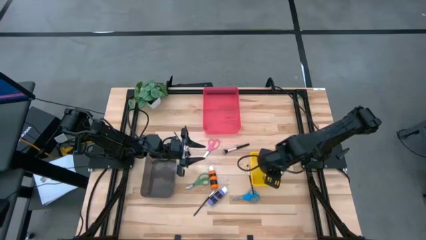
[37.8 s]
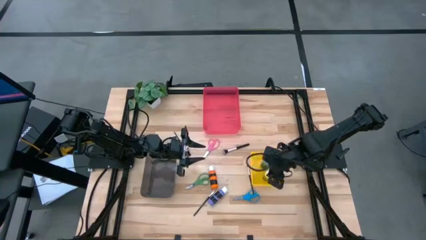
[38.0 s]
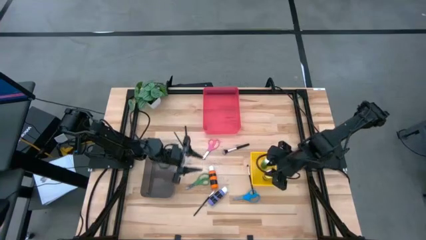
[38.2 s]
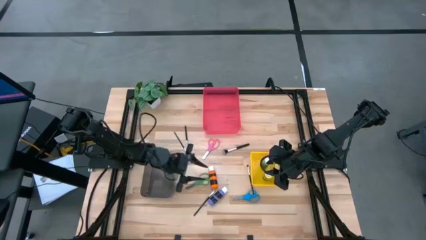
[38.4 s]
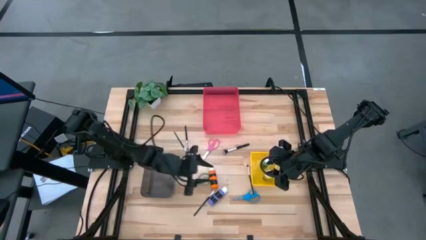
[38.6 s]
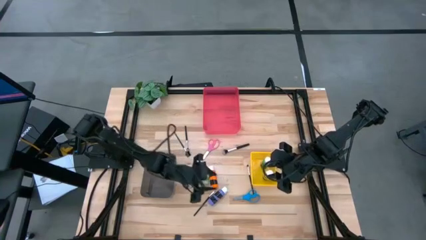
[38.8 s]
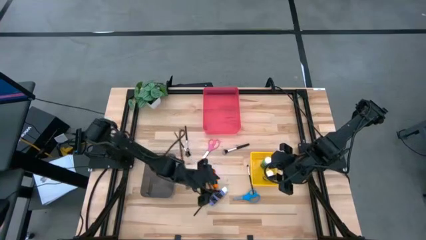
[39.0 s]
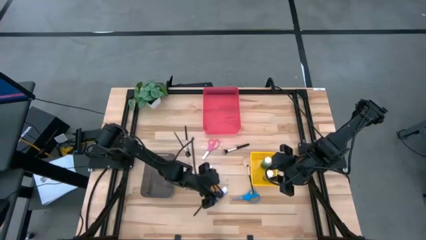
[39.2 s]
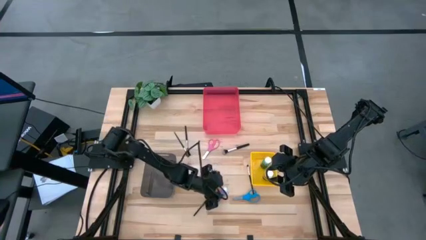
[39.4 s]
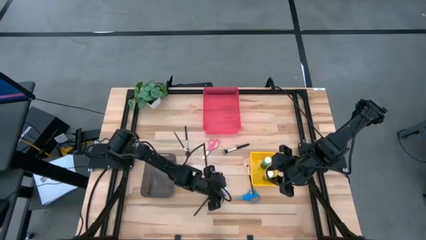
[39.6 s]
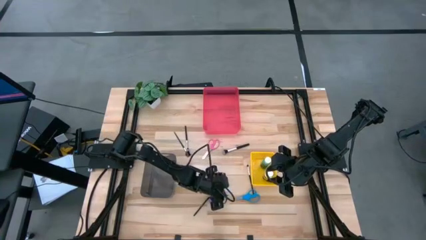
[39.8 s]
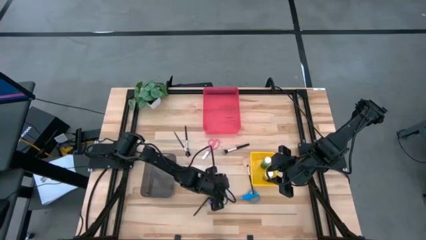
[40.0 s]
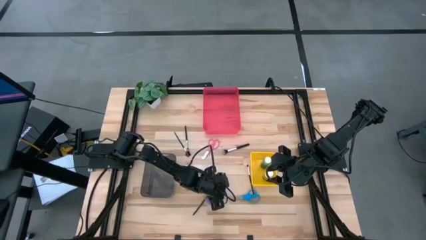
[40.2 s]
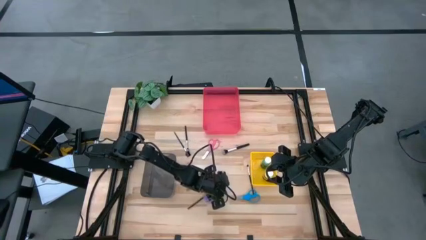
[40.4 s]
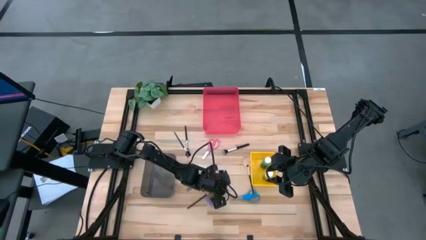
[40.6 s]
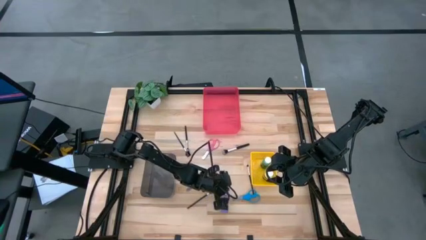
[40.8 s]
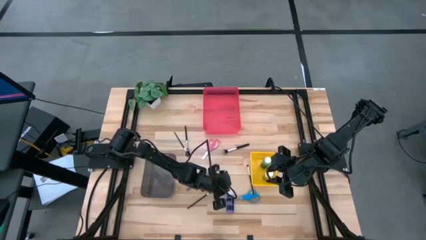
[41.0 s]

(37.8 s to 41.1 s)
Task: Pick & Place Paint Supplies
Put the violet paint bottle into the yellow bin

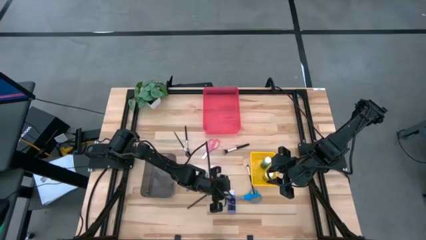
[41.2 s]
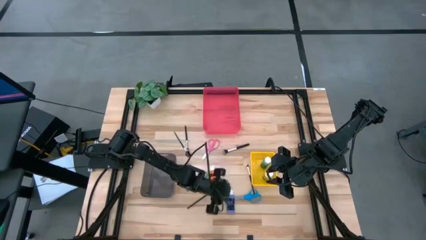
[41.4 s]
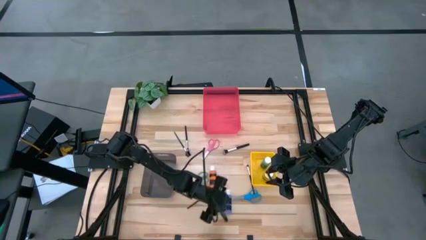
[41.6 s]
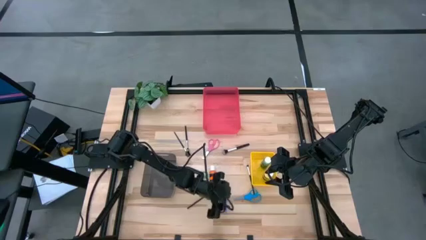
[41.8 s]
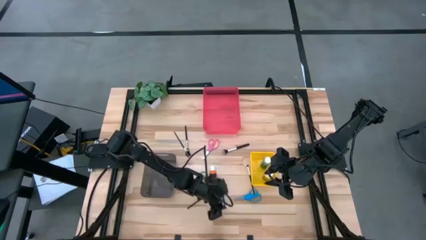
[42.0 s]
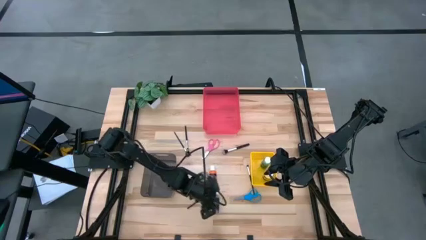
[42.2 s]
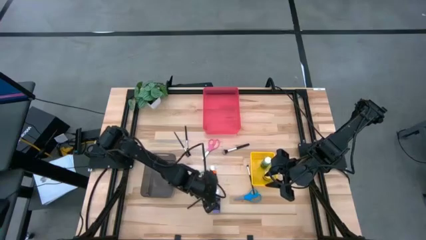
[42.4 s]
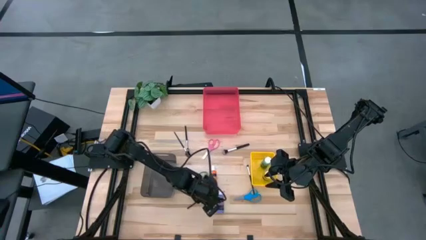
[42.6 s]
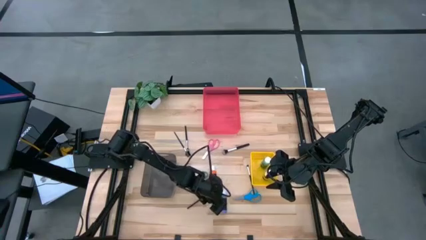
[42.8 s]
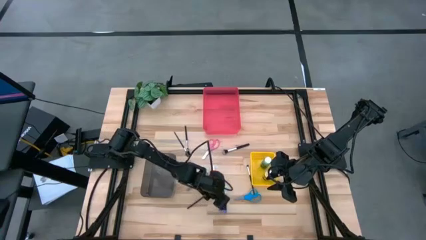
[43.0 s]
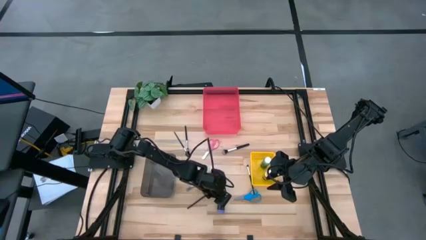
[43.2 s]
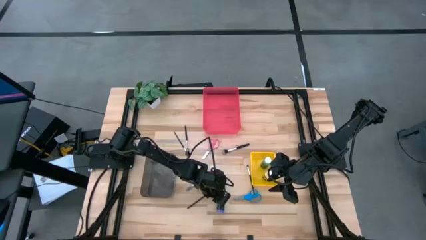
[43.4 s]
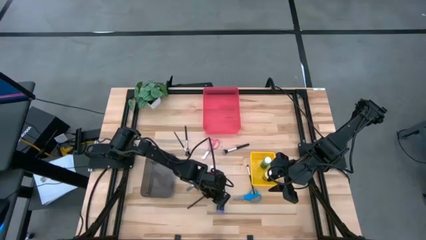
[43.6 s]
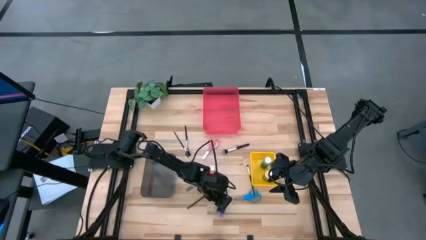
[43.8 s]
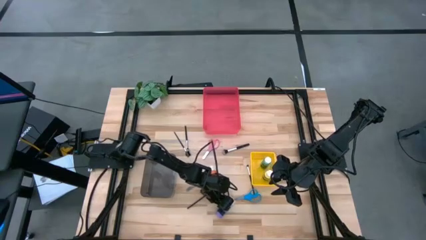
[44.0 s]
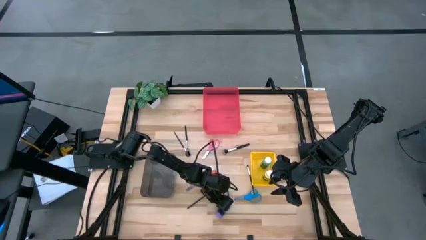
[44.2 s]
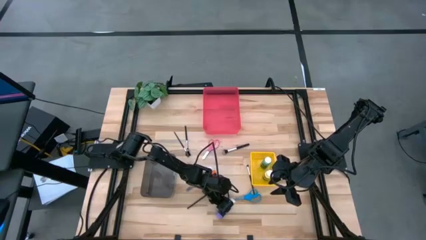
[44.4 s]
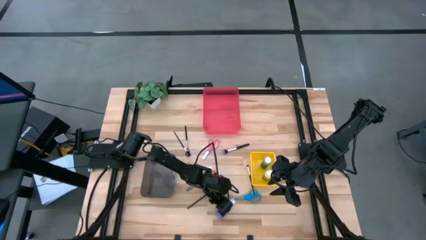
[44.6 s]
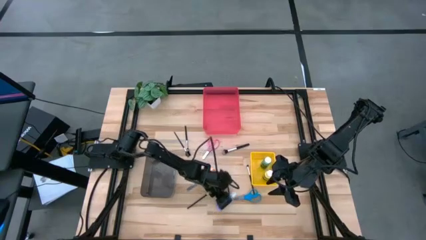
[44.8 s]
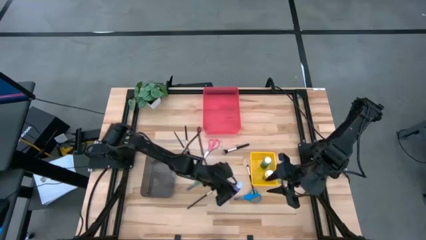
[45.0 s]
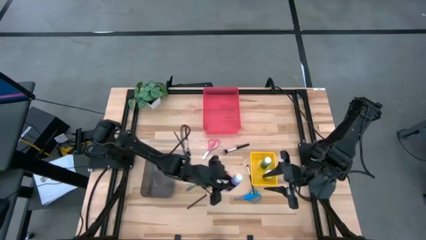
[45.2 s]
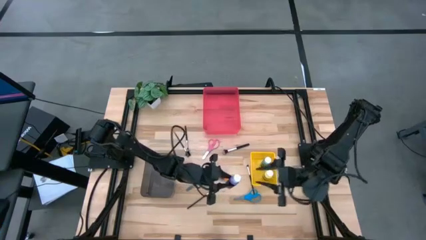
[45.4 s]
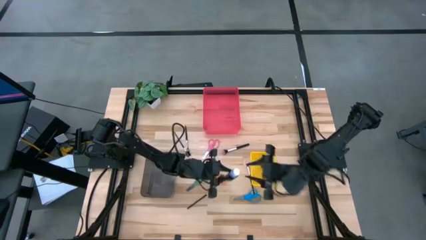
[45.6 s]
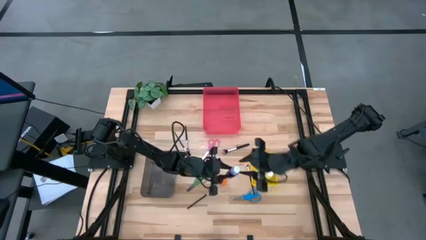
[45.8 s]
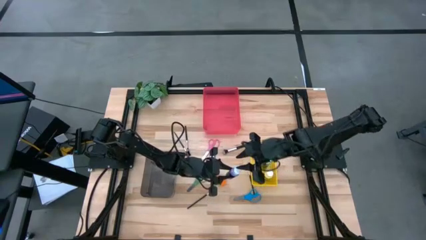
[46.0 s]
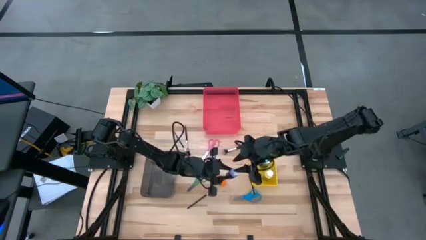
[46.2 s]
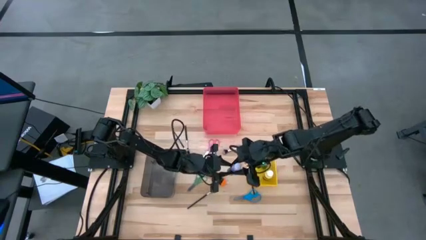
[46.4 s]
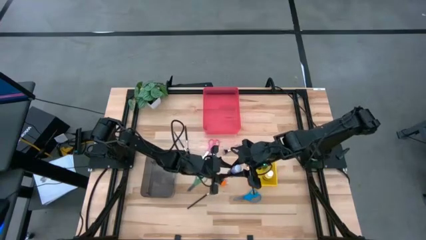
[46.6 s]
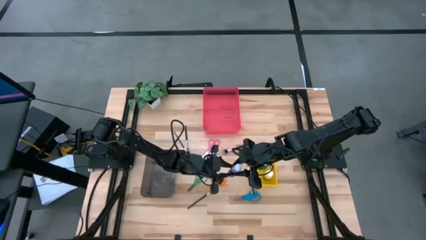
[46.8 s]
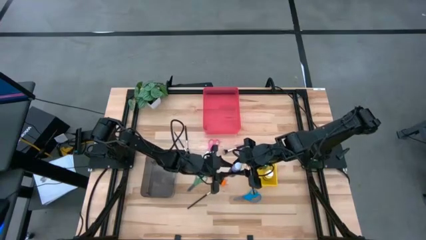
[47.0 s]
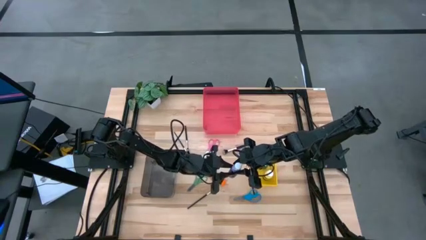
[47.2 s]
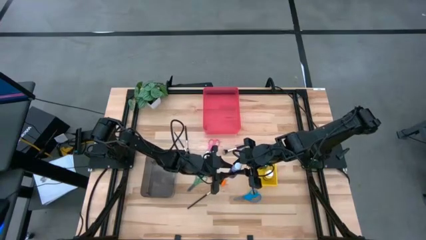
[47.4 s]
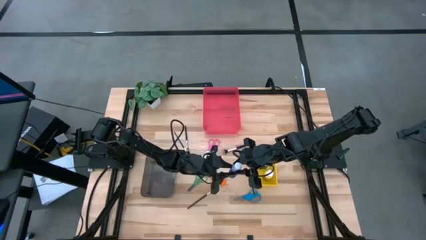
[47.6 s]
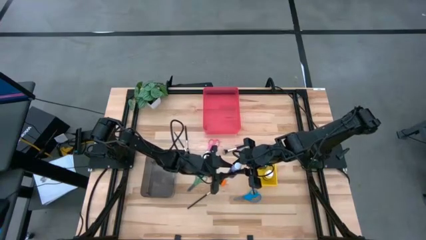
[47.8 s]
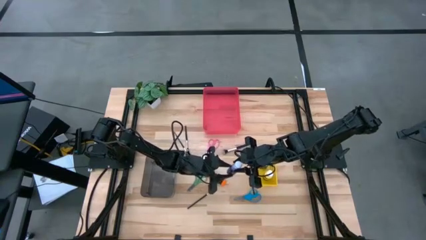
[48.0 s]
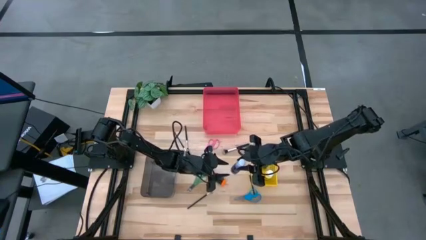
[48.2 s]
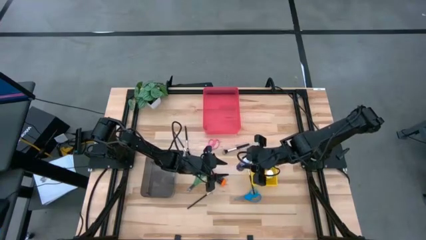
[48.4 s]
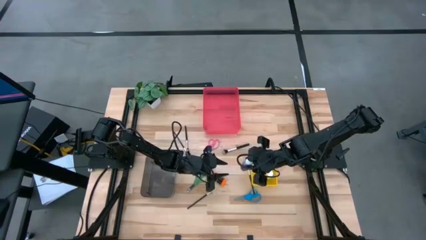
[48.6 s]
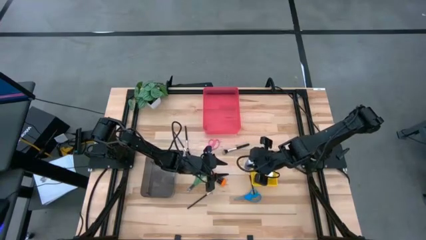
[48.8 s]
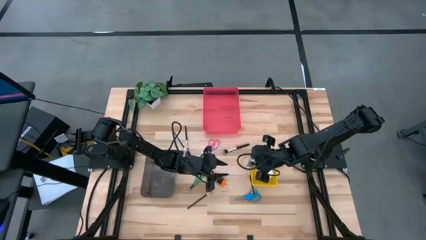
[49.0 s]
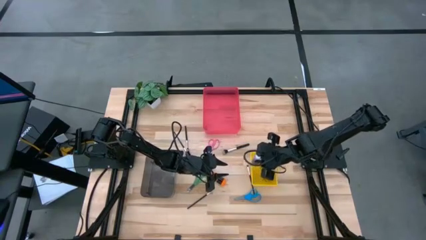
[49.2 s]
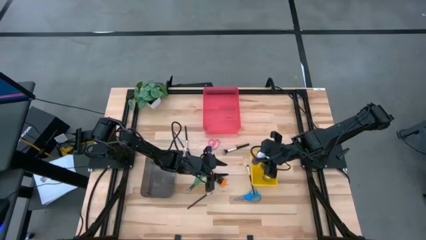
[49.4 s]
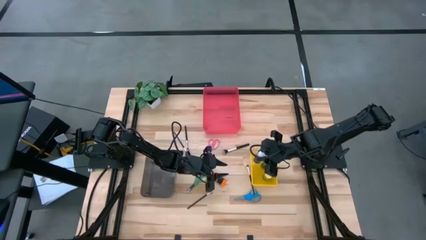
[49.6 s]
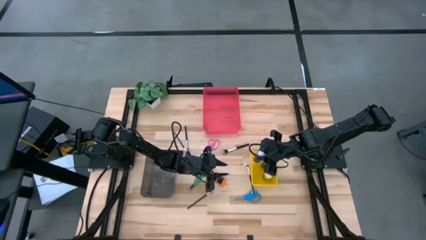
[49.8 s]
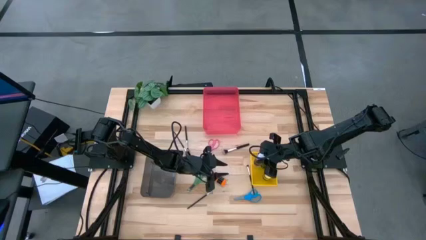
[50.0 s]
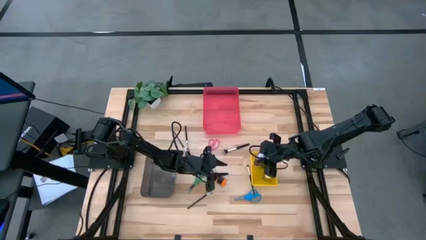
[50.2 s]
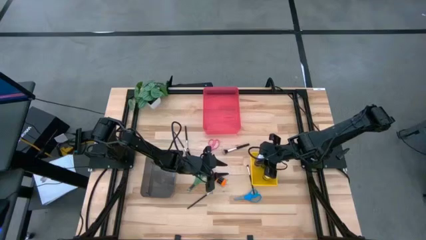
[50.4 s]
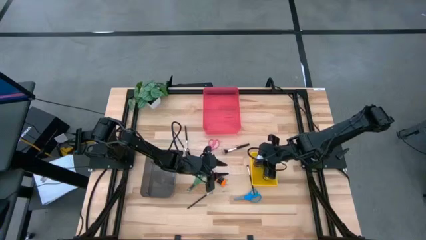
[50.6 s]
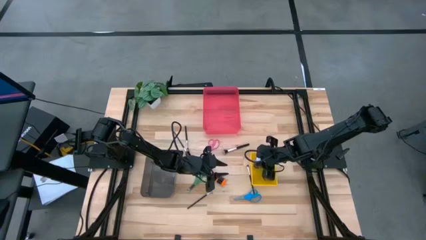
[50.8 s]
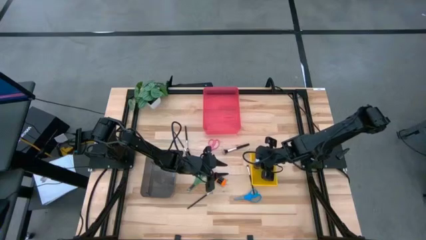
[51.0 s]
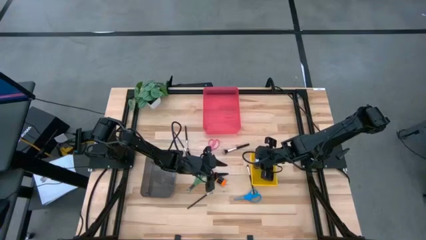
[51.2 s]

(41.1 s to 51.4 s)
Put the violet paint bottle into the yellow bin
